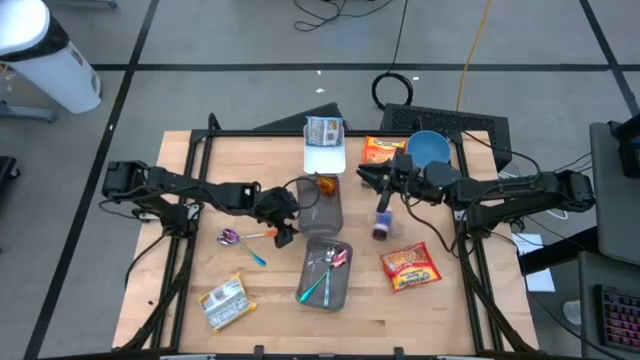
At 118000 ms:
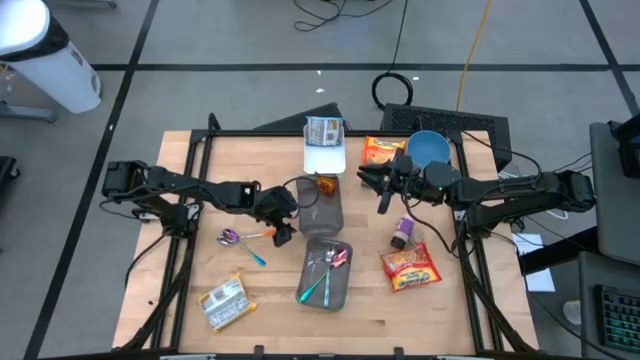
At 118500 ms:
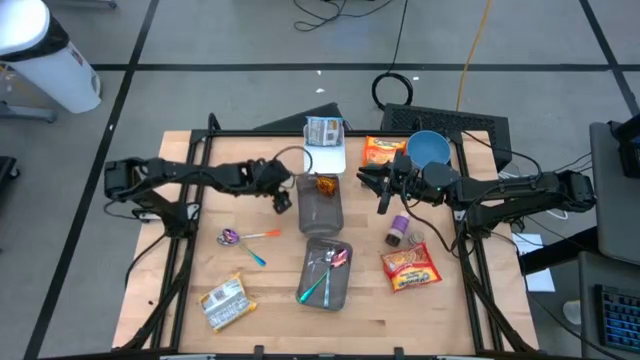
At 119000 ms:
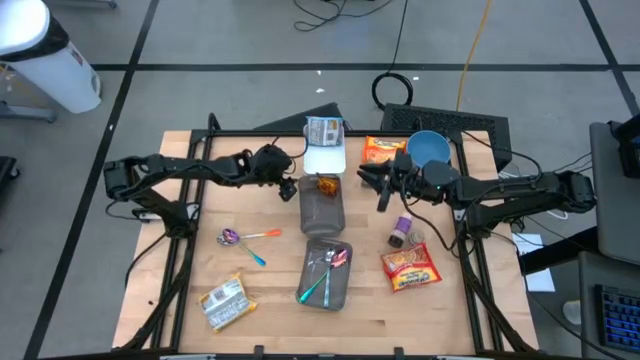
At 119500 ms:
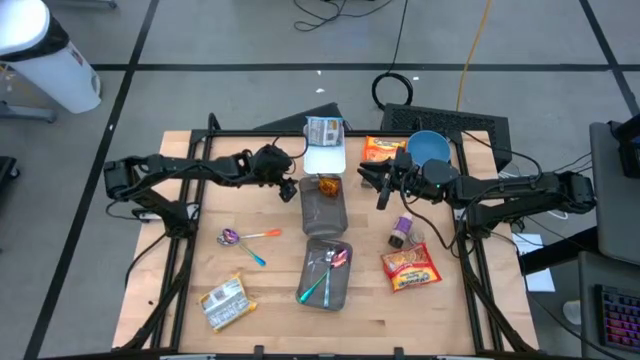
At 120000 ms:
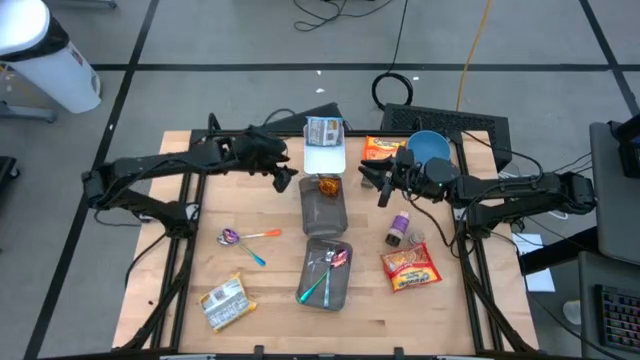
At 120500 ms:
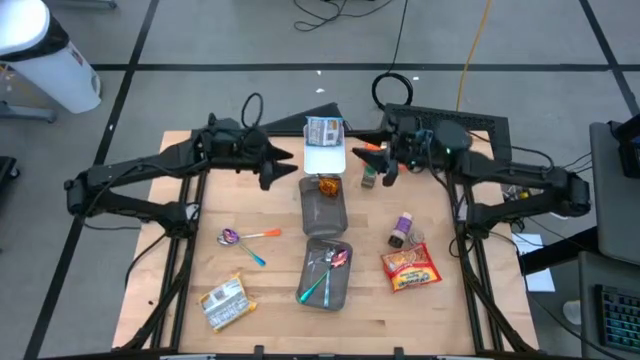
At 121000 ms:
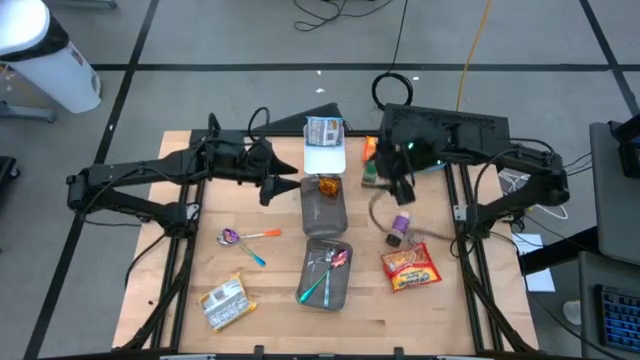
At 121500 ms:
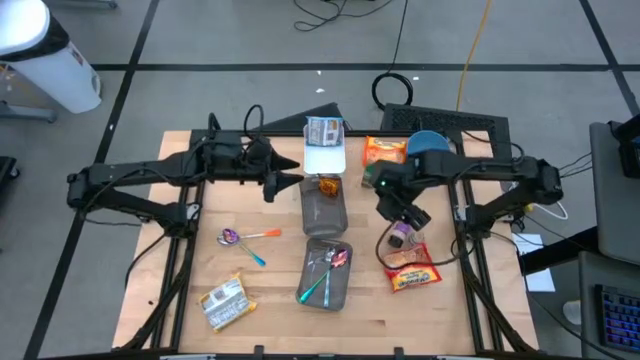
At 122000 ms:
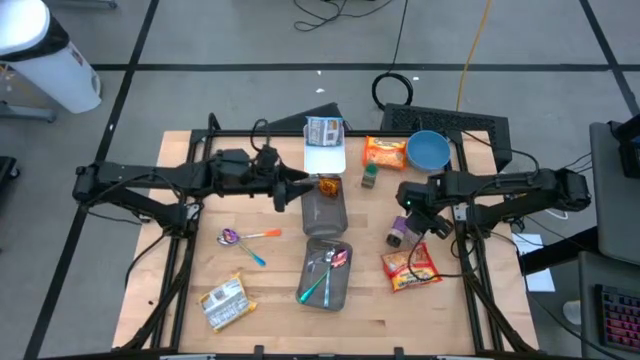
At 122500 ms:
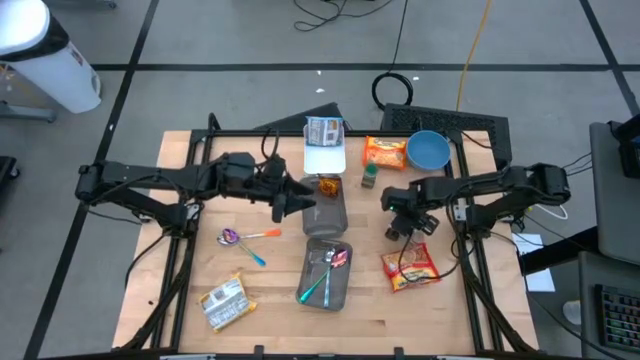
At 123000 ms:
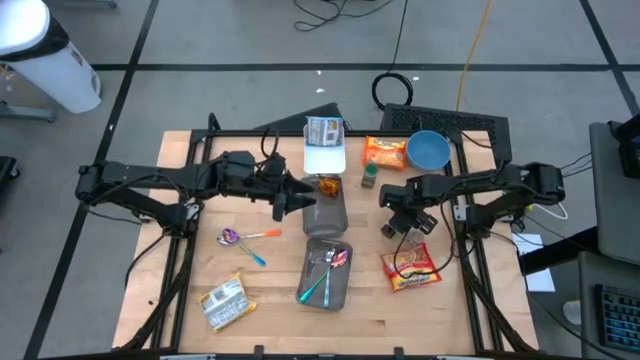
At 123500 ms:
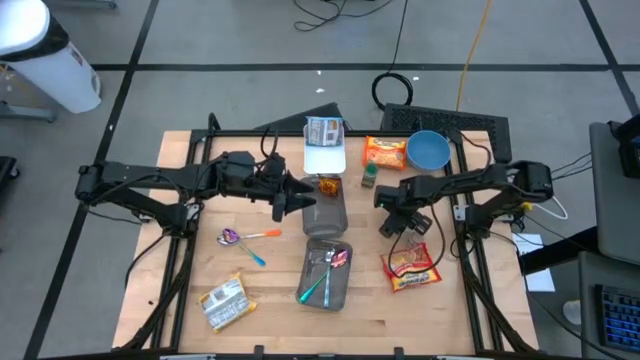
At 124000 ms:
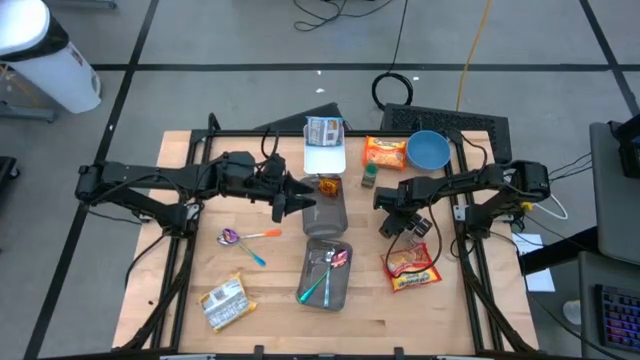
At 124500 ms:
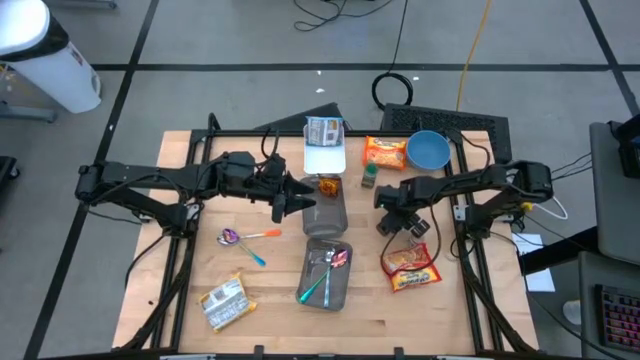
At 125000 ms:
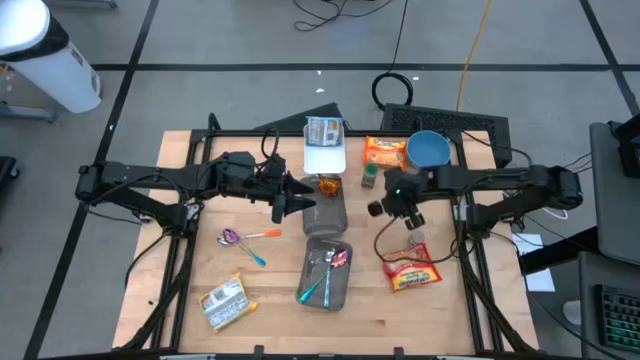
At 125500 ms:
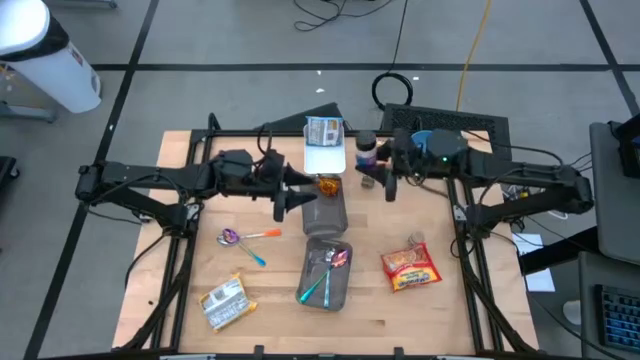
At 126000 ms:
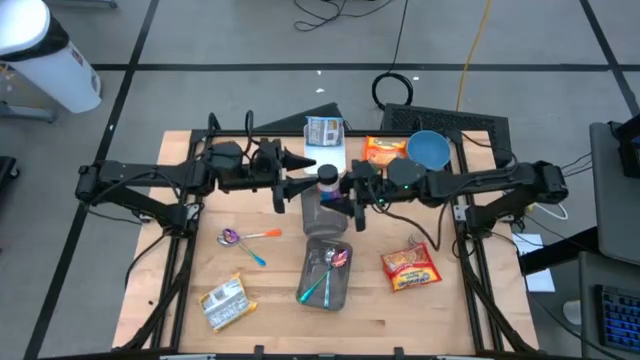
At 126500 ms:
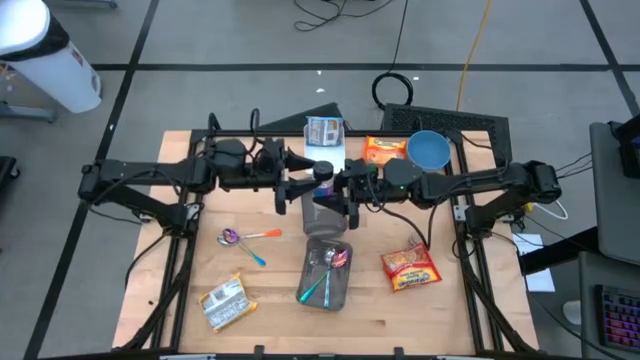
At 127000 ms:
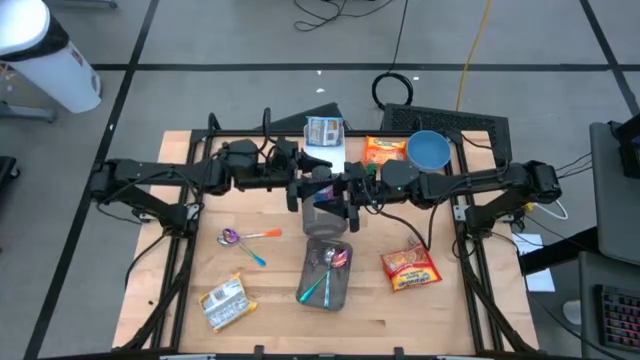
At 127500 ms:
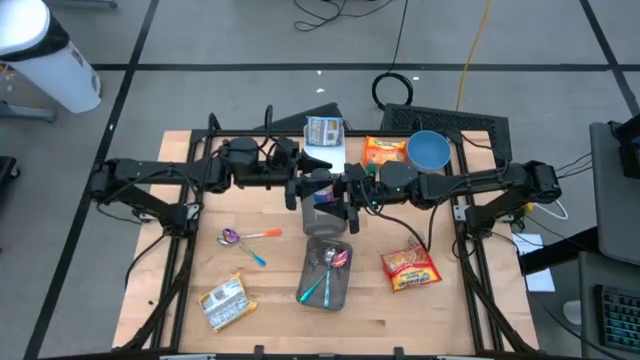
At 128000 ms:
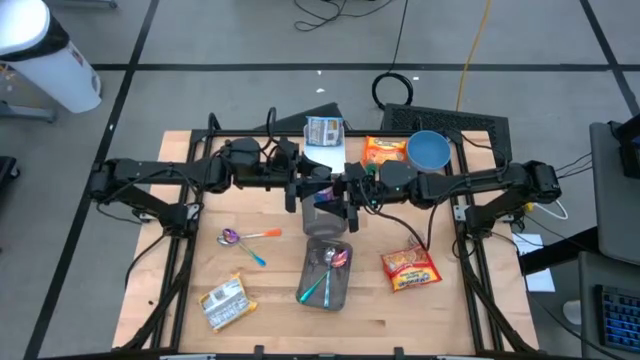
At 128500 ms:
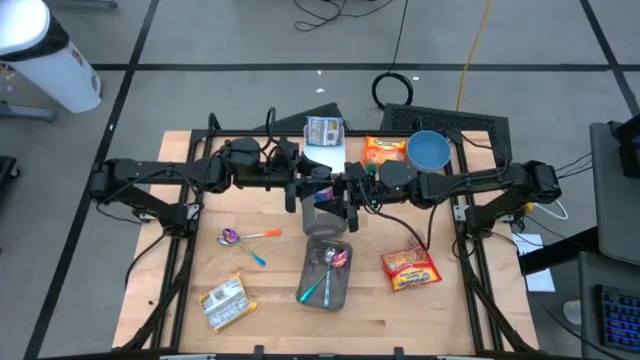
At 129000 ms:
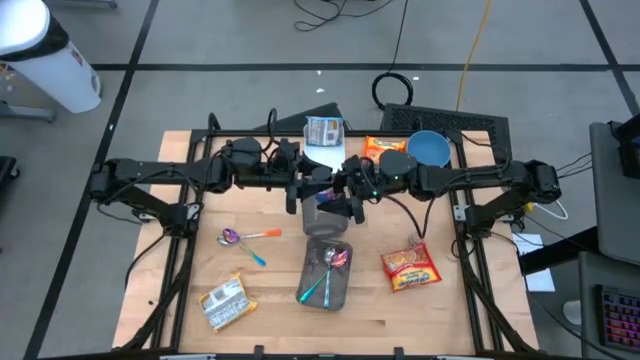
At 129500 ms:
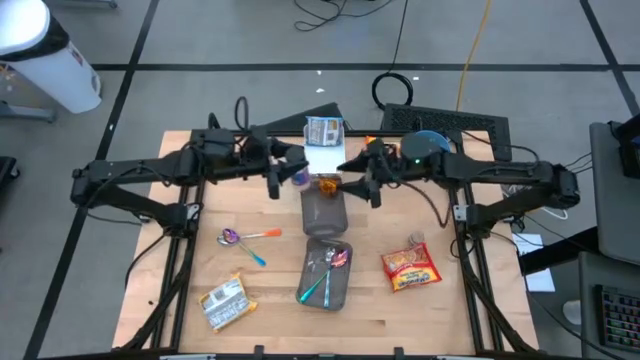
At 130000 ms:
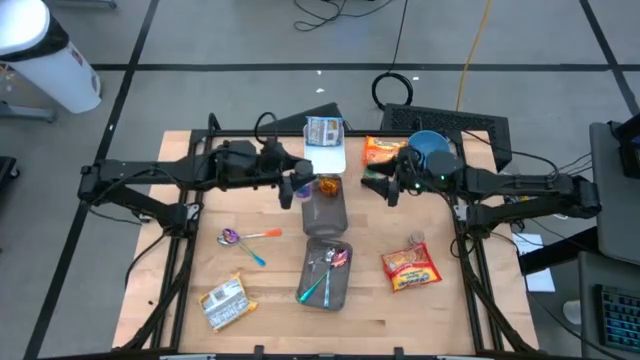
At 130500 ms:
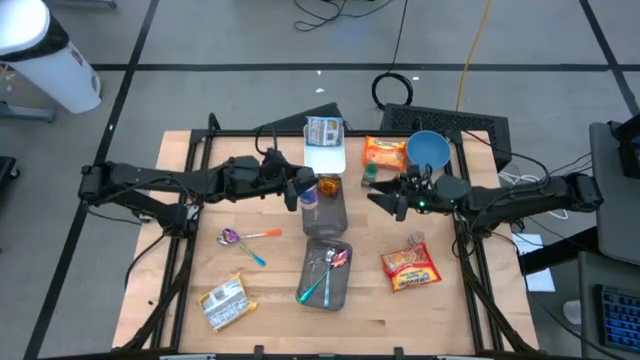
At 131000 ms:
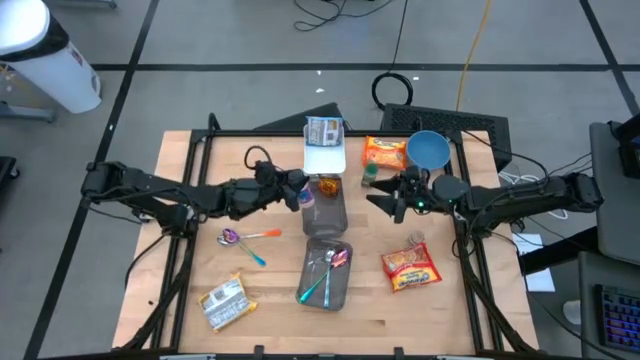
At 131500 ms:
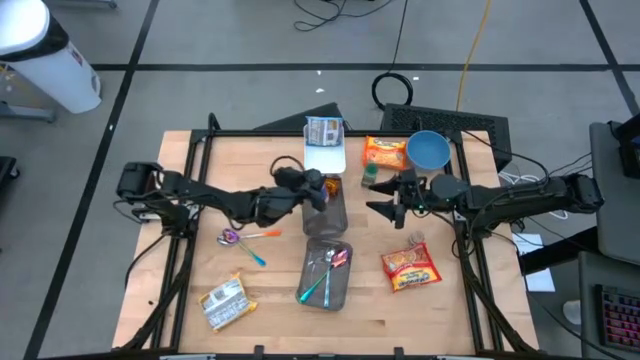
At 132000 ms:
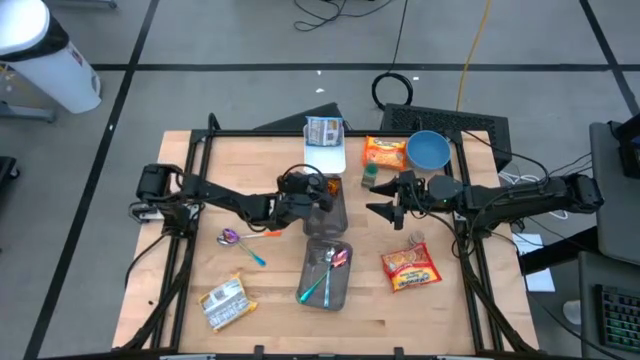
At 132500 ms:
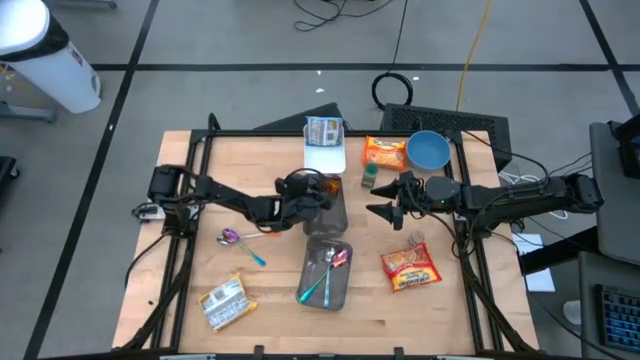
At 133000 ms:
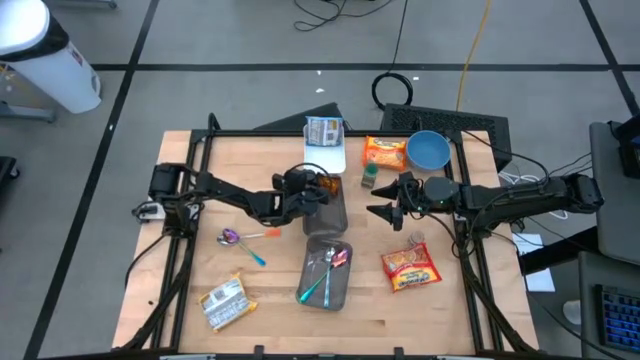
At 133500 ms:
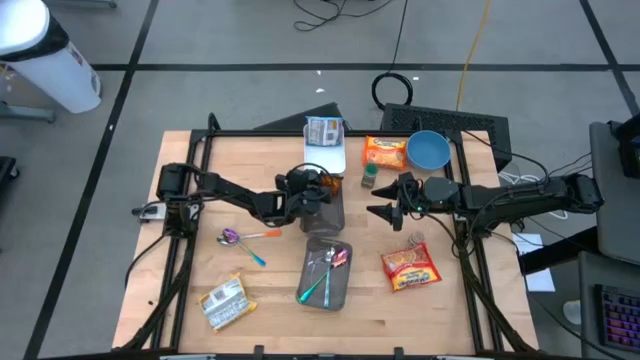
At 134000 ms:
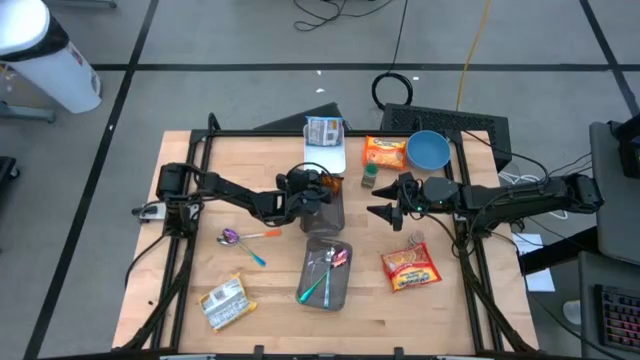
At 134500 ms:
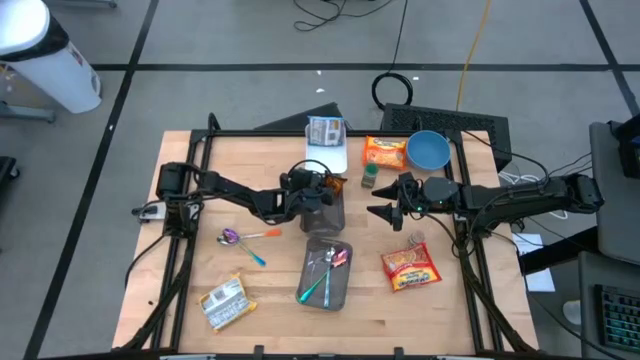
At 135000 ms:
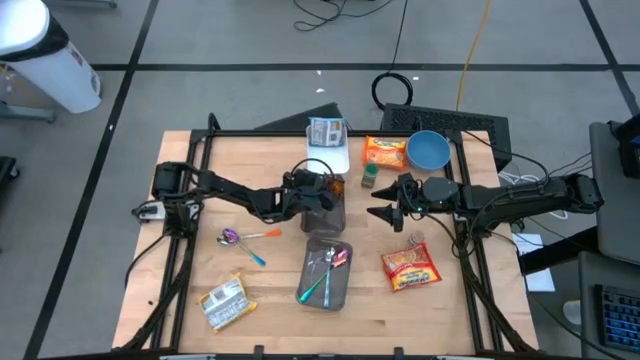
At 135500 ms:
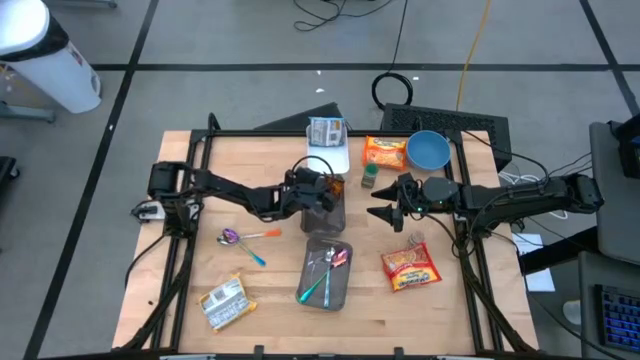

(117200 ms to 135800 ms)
Task: Pick & Place Food Item
Put the black seasoning bottle into the top black bin

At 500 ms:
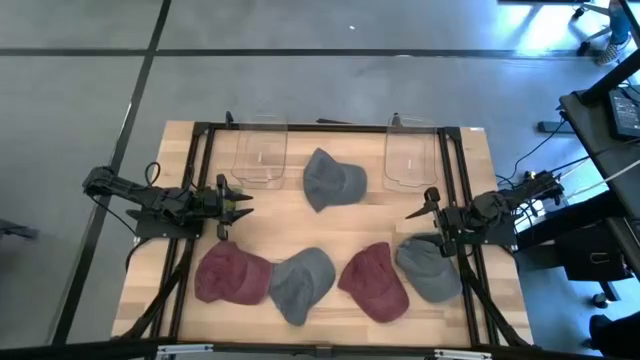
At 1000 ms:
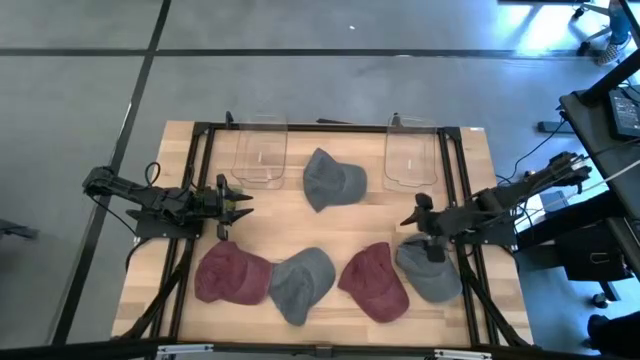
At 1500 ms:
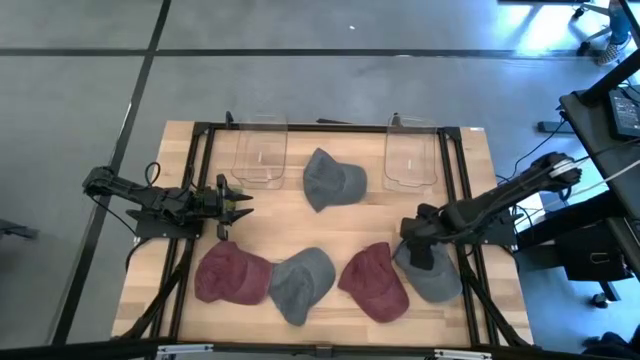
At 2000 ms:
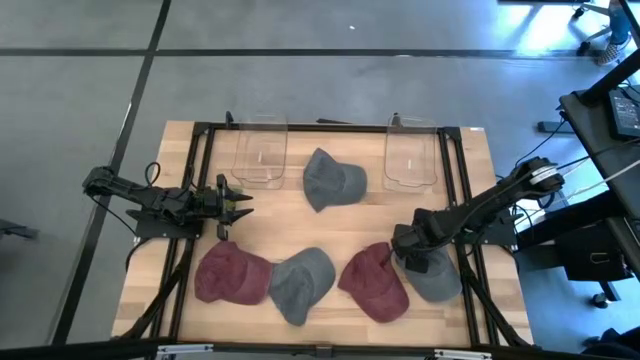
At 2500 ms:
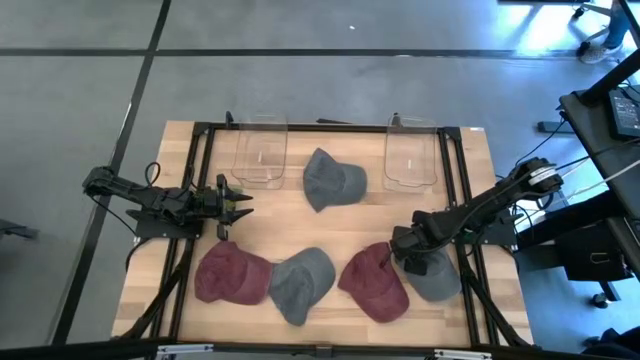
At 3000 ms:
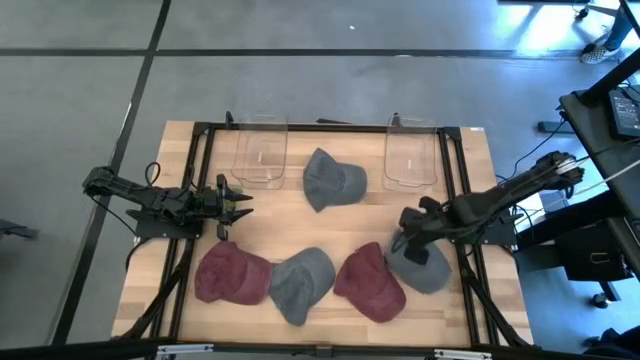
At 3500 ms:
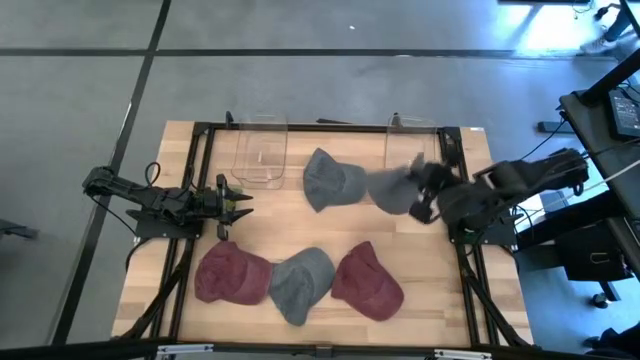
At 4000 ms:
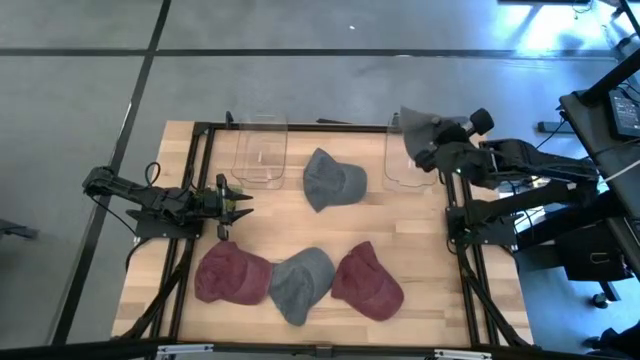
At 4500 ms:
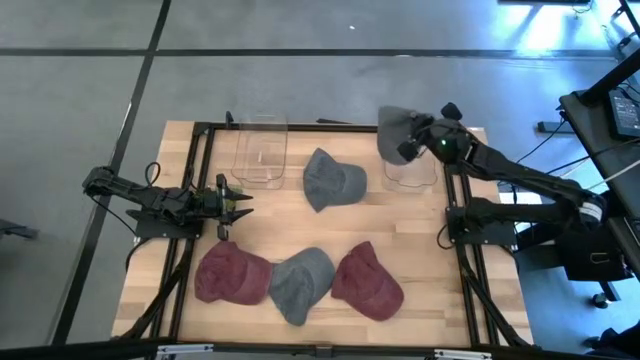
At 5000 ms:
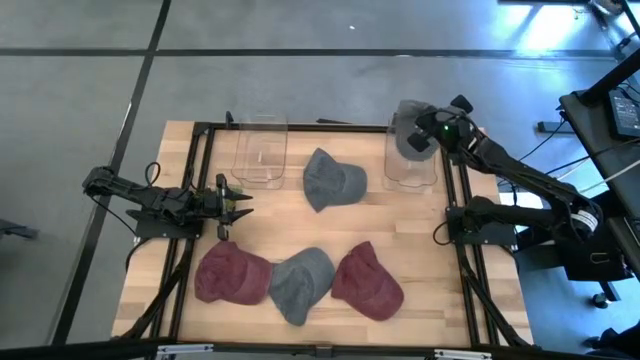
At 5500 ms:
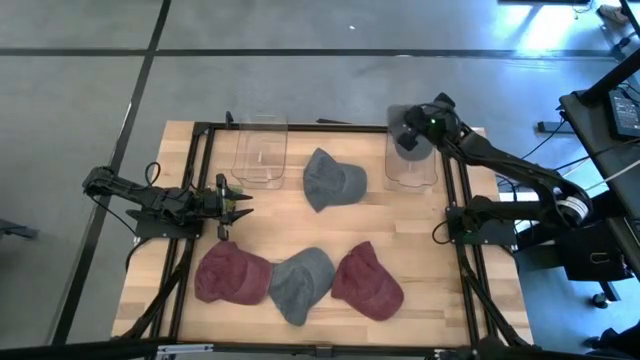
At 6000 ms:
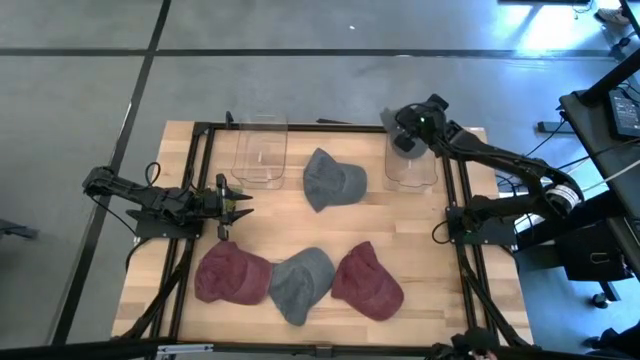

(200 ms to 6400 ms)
Task: Pick & Place hat
Put the bottom right gray cap into the right transparent bin
